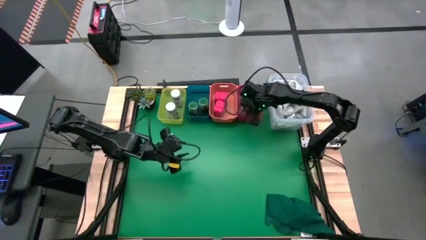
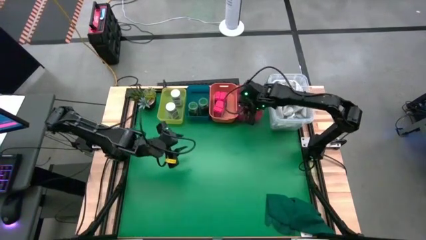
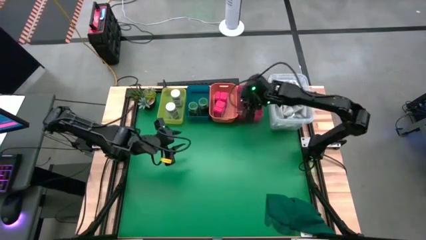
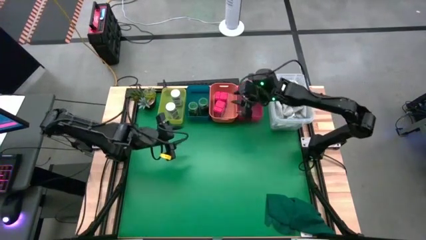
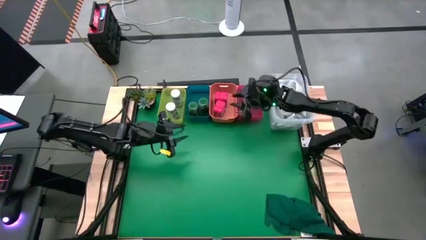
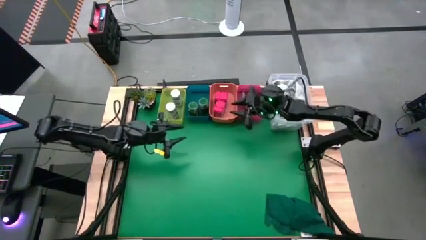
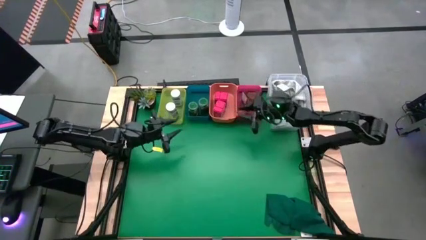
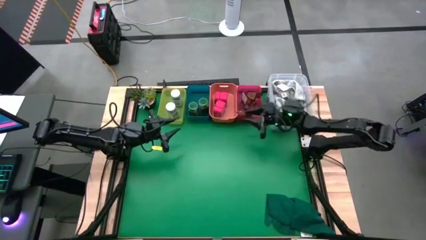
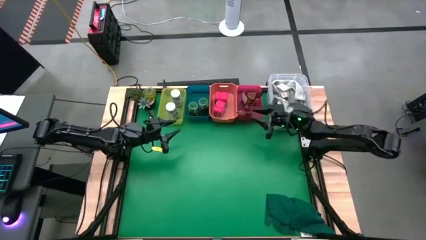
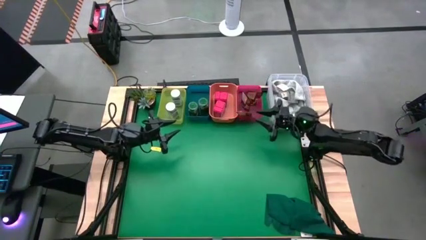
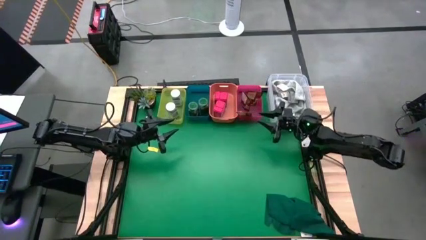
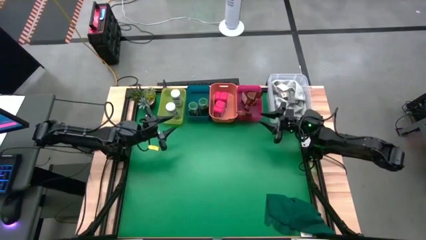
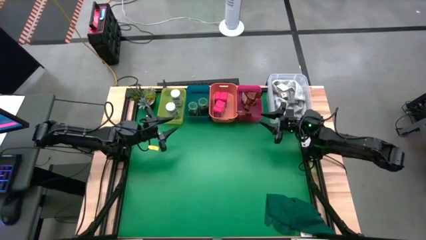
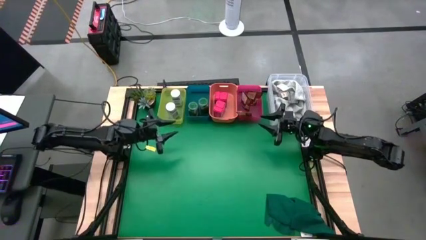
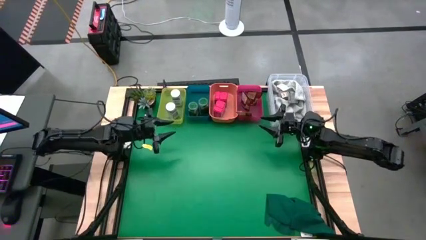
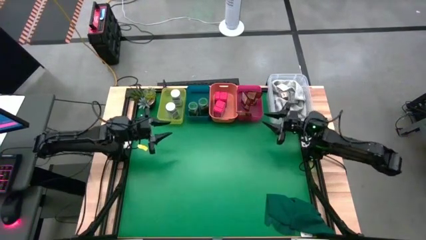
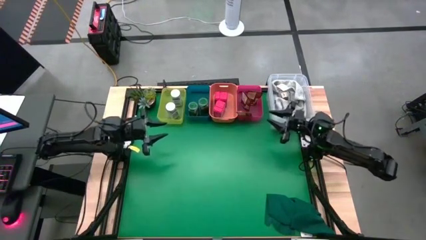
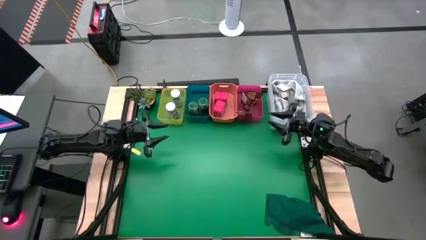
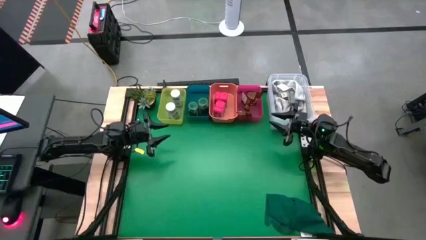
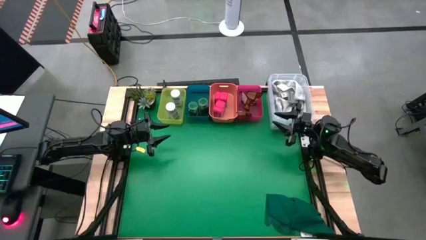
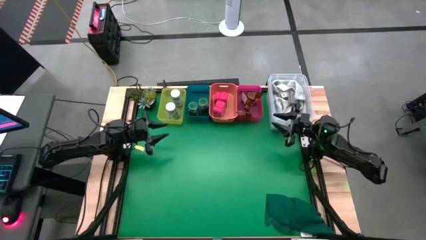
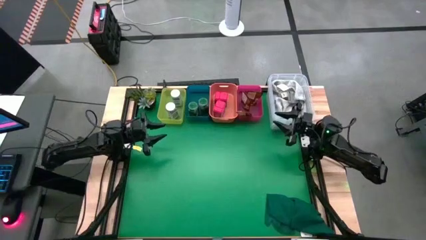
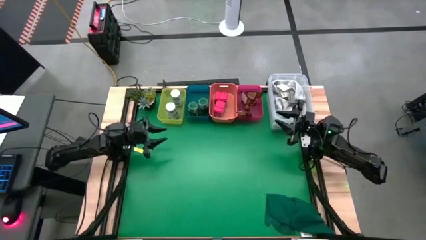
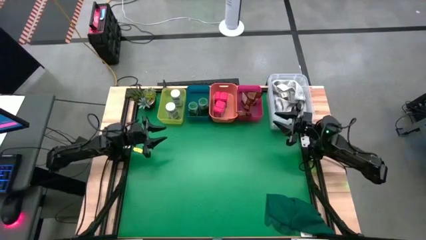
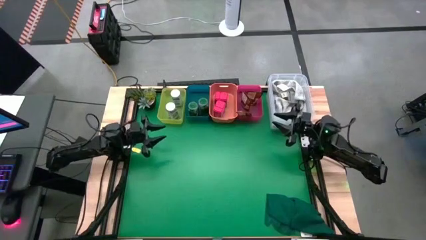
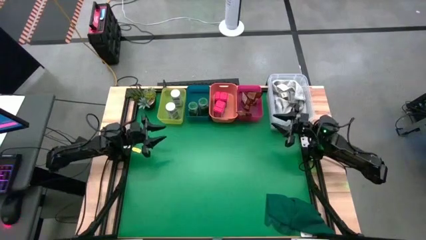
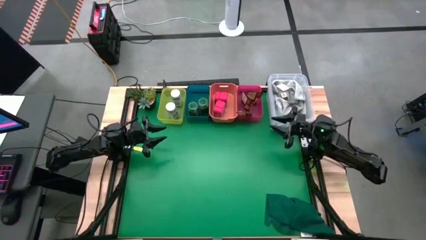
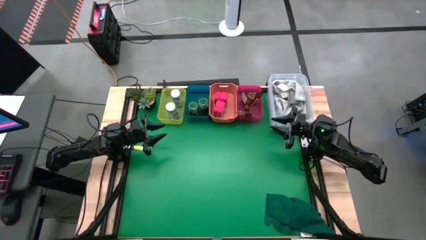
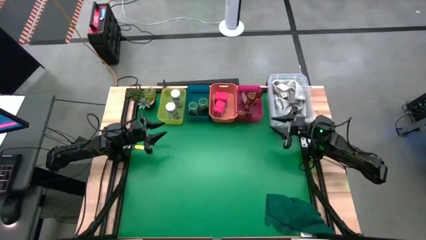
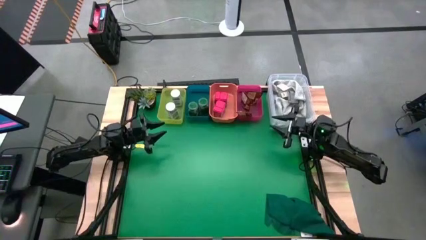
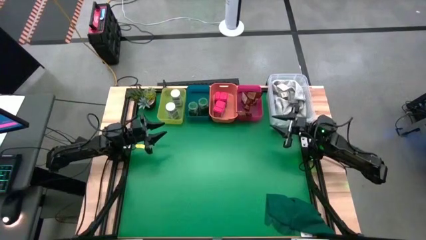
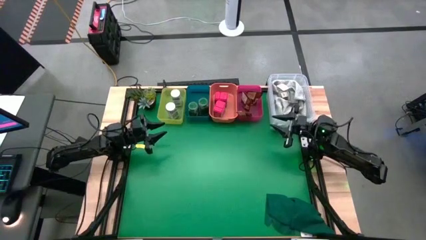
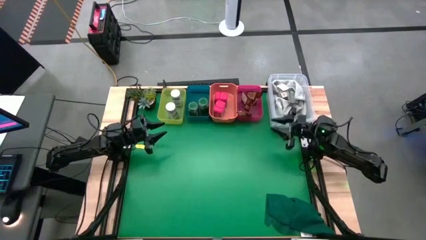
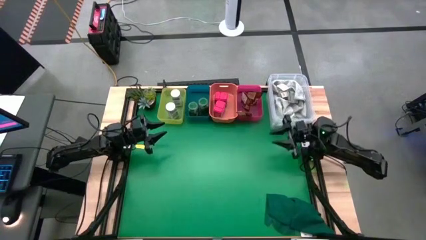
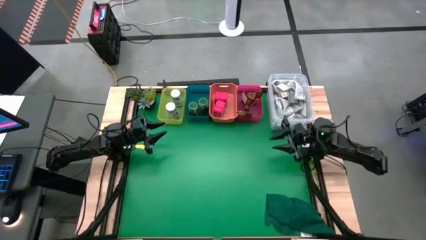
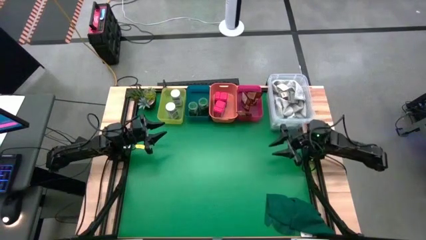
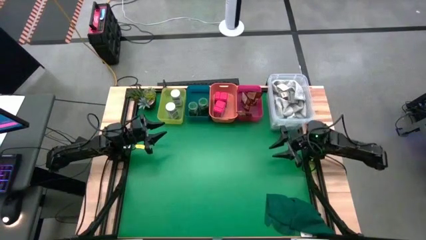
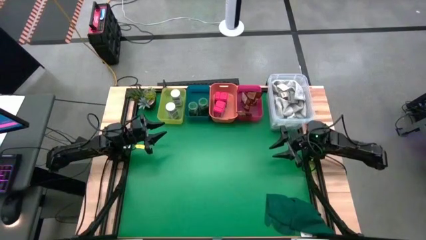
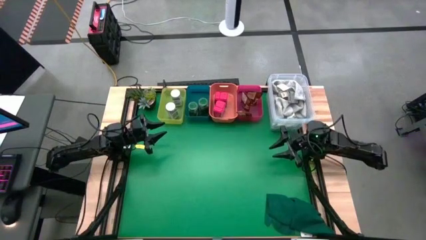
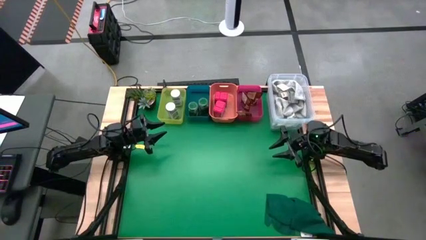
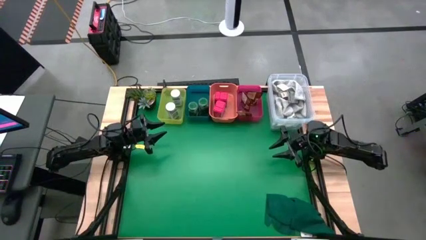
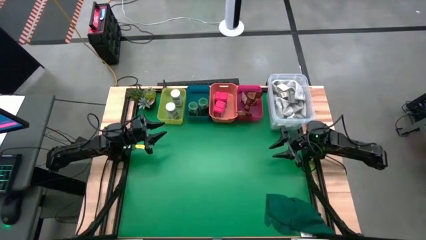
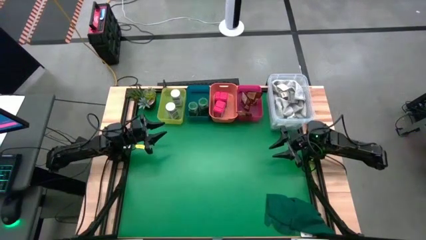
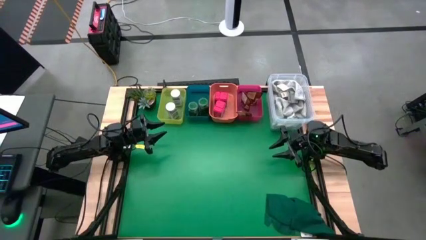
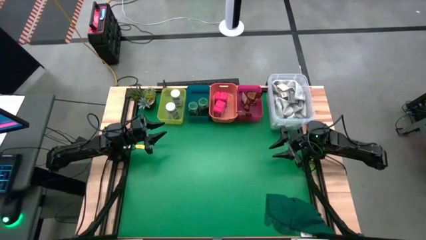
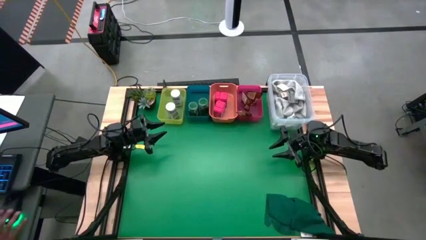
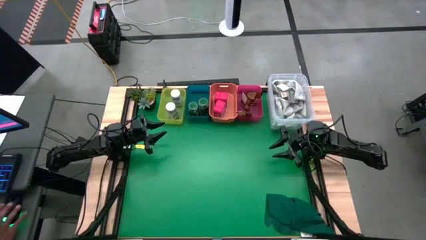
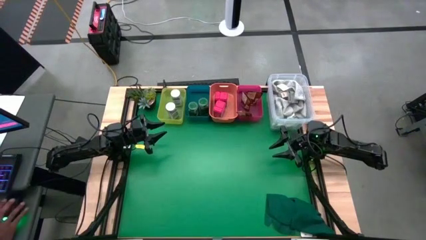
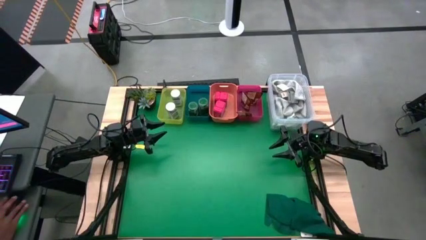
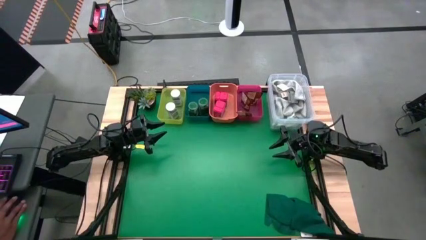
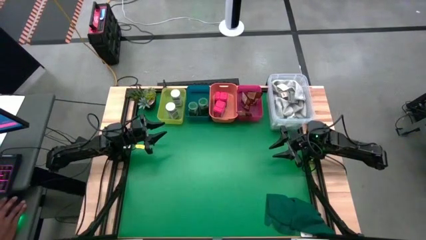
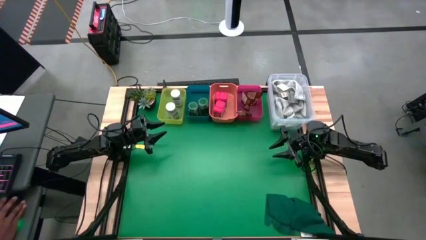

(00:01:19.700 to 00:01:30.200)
Task: Sort spices by type
Return to Home Position

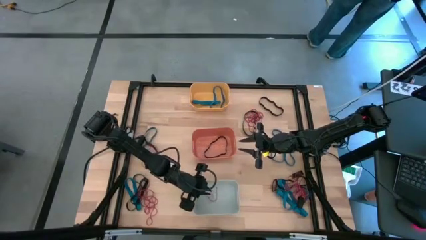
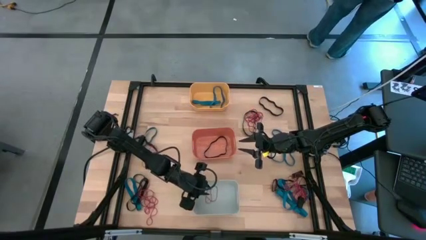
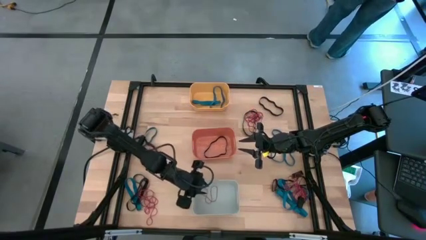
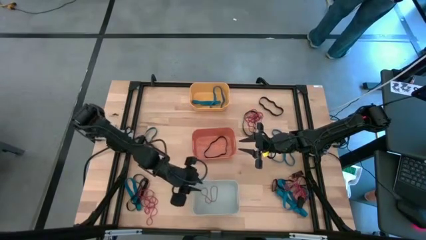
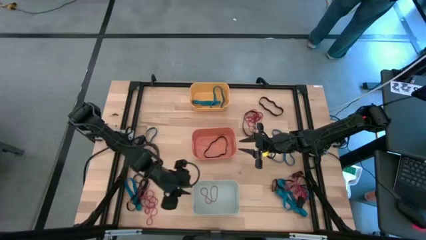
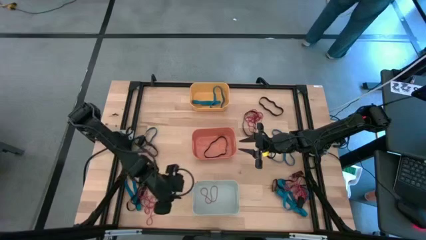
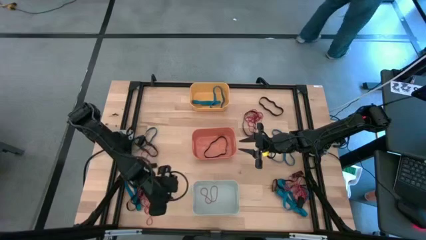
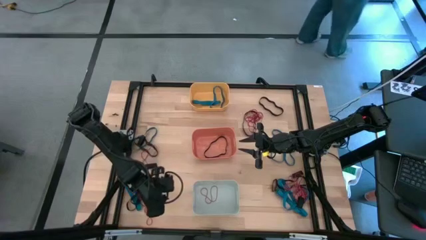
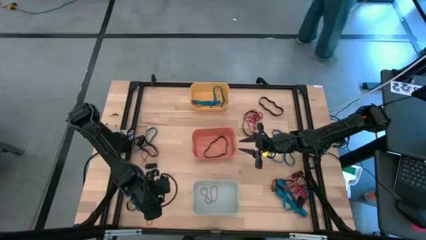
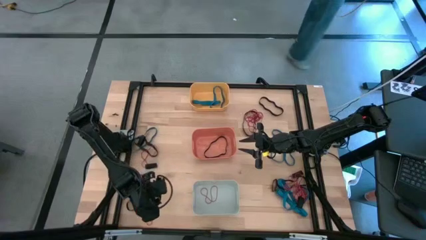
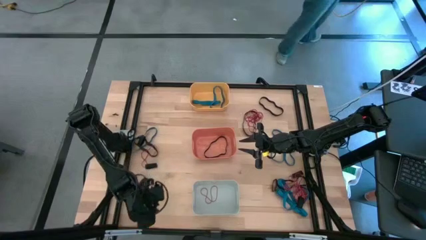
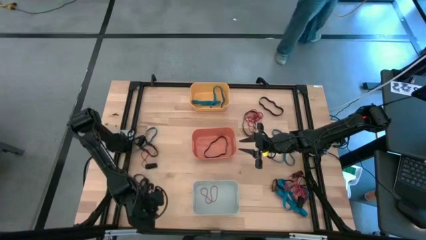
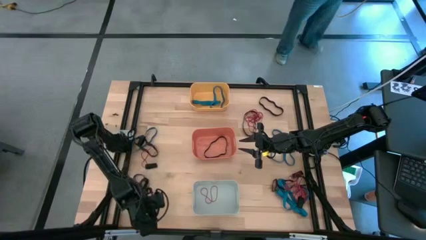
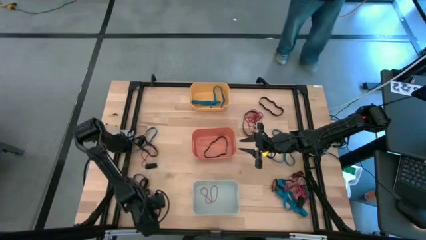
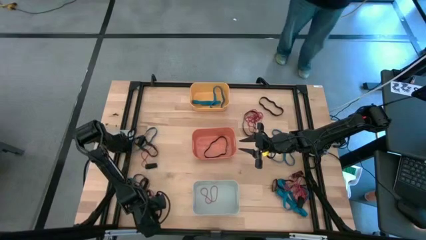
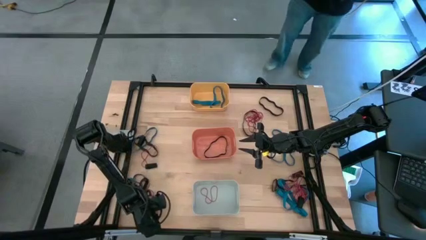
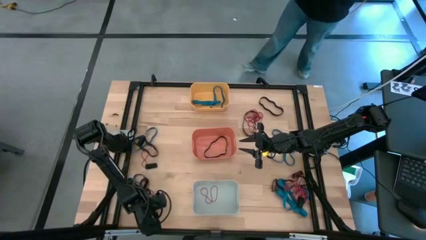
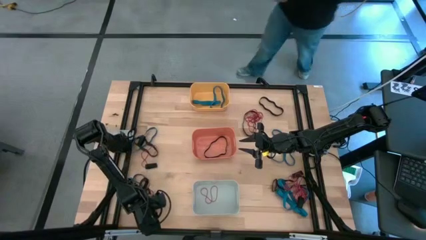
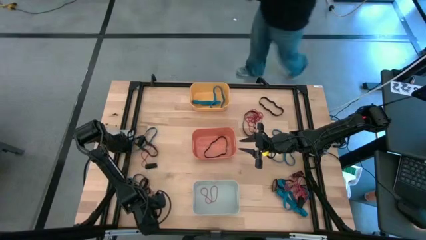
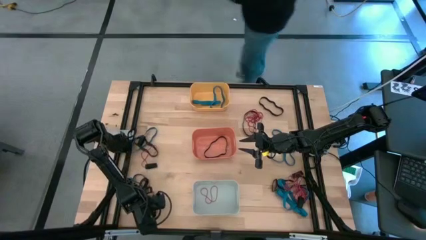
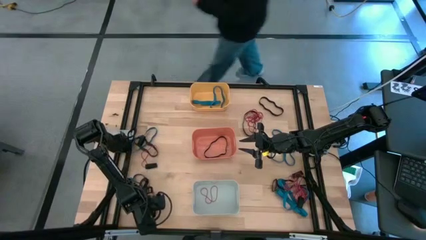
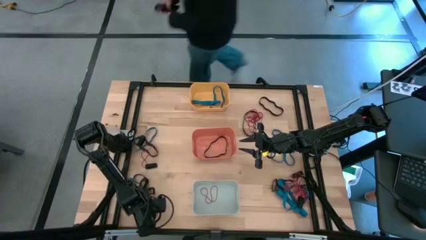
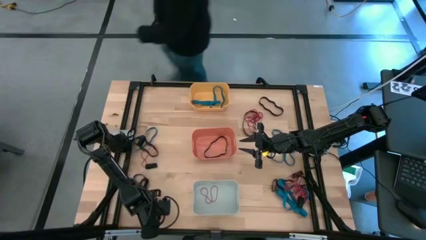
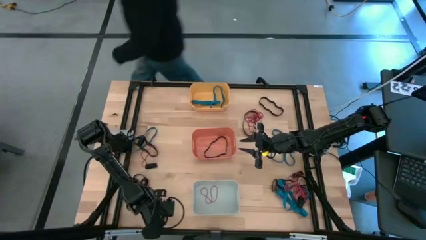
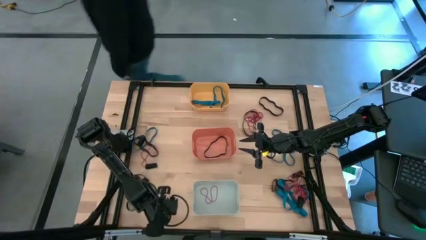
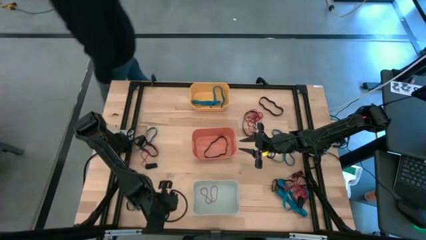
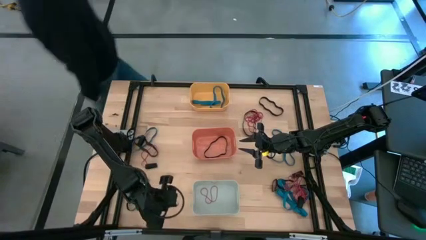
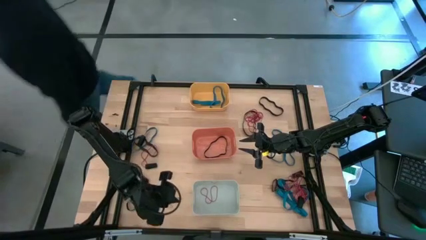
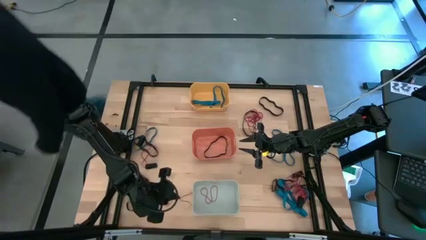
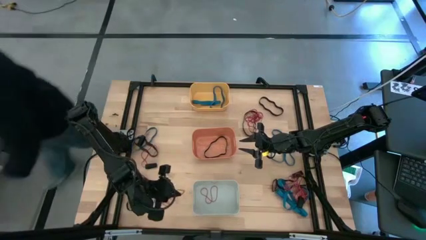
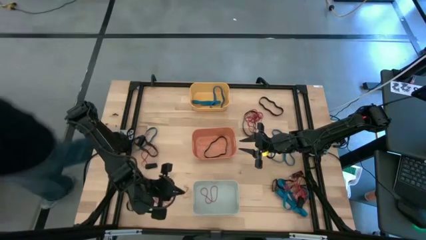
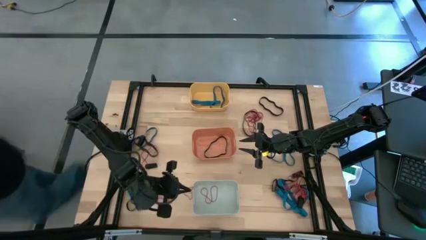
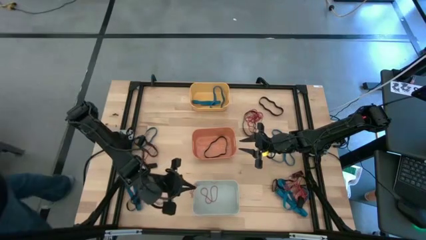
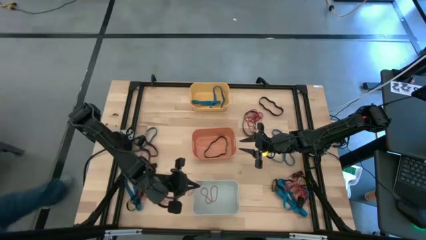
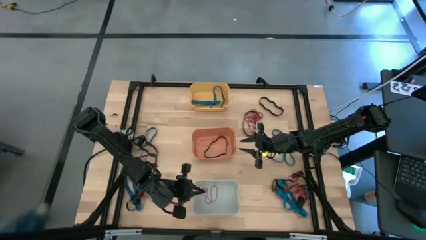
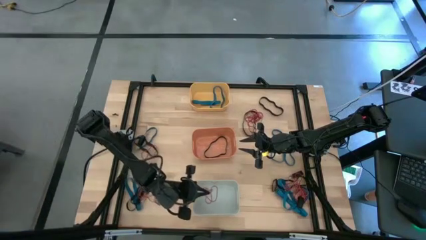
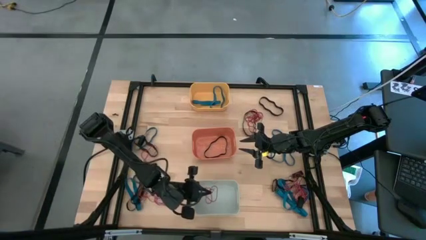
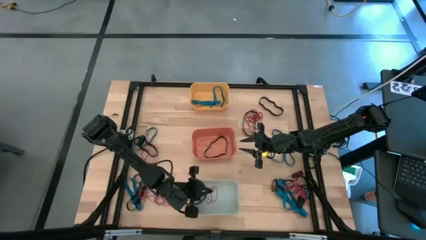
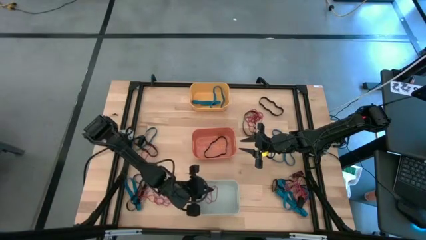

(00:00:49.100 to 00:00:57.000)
Task: Sort rubber bands into baskets
Put the red rubber band in the white bin
